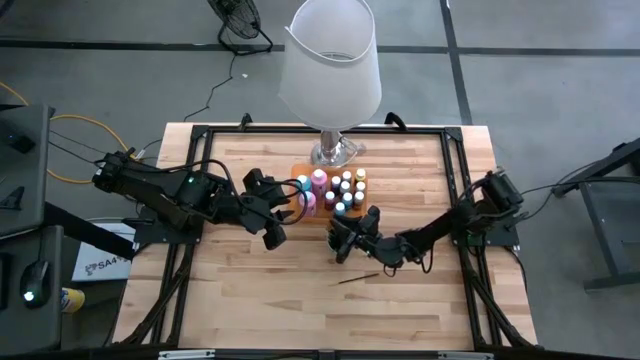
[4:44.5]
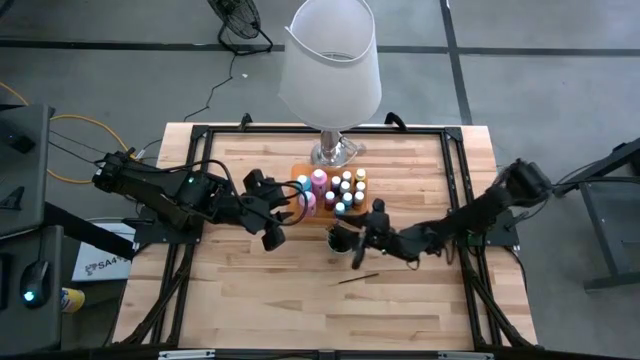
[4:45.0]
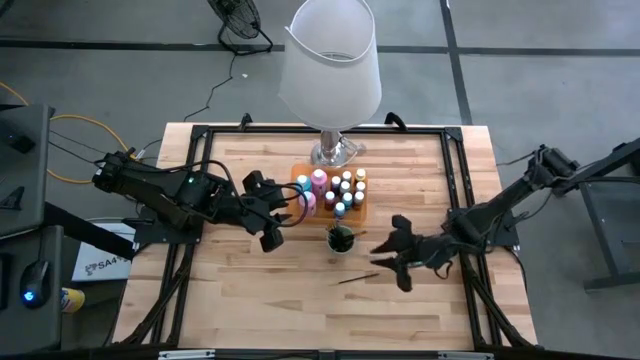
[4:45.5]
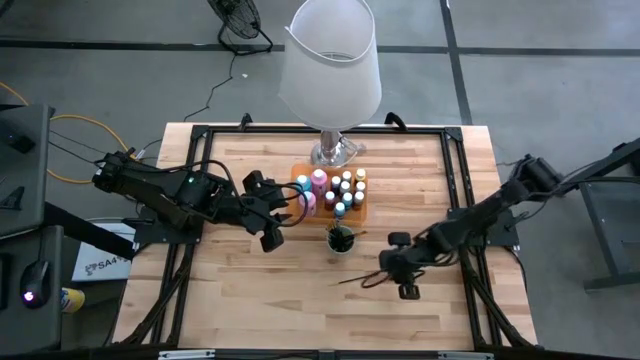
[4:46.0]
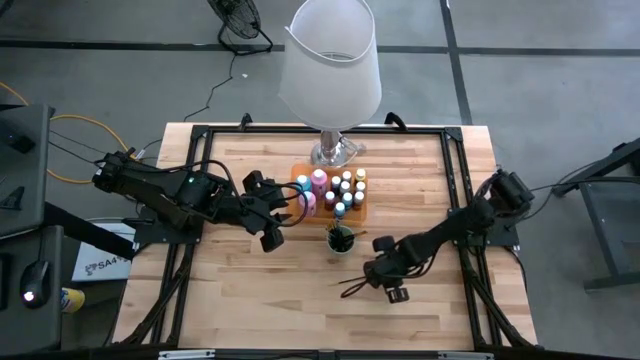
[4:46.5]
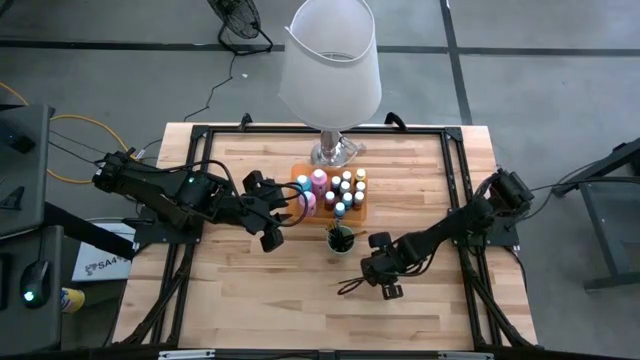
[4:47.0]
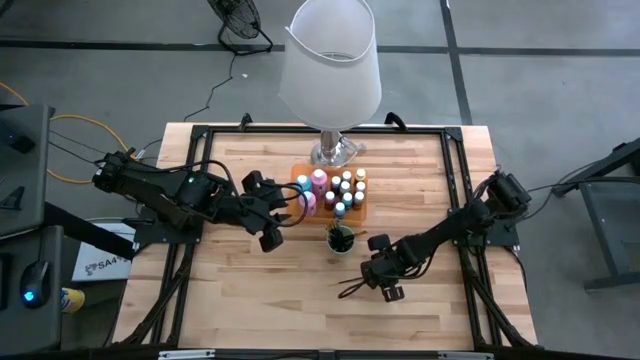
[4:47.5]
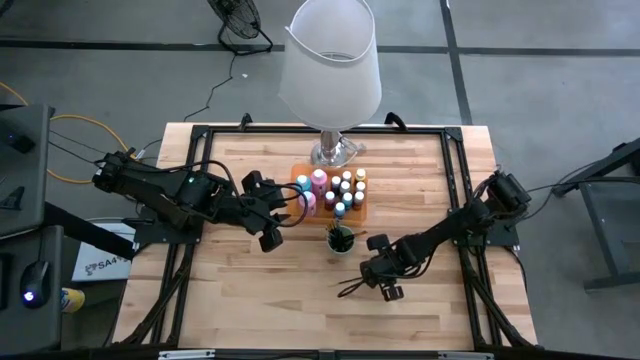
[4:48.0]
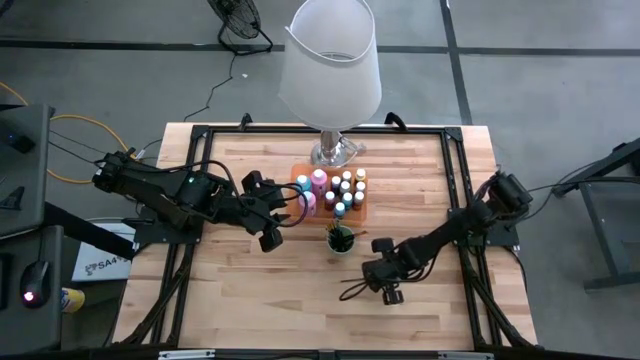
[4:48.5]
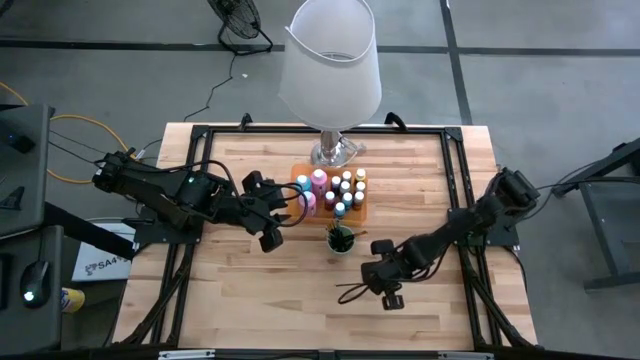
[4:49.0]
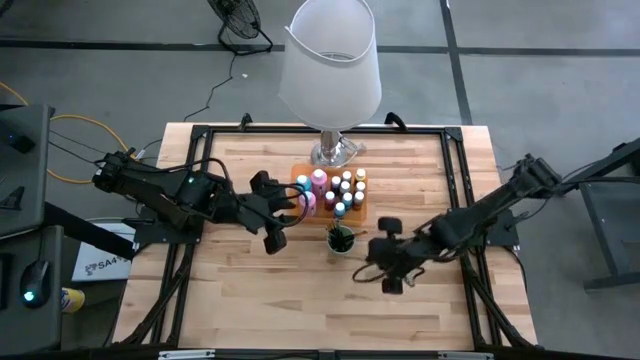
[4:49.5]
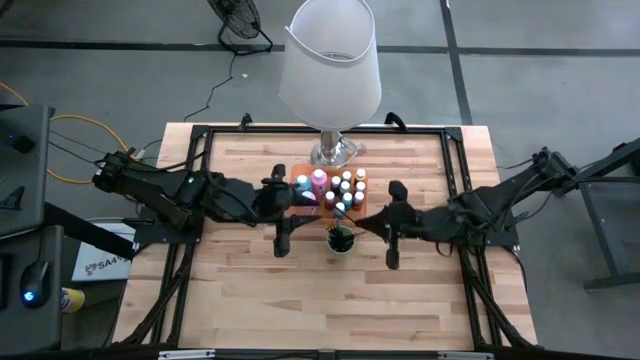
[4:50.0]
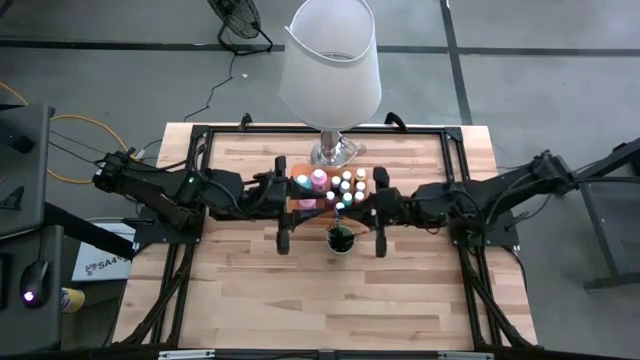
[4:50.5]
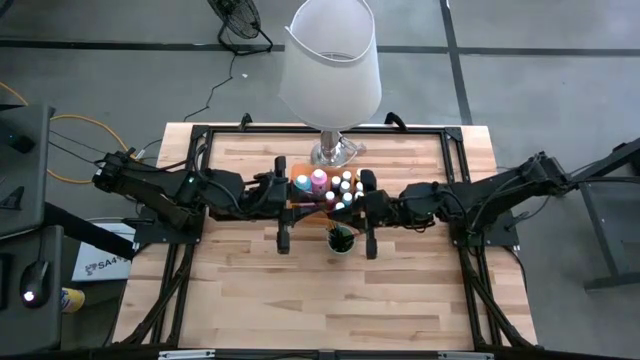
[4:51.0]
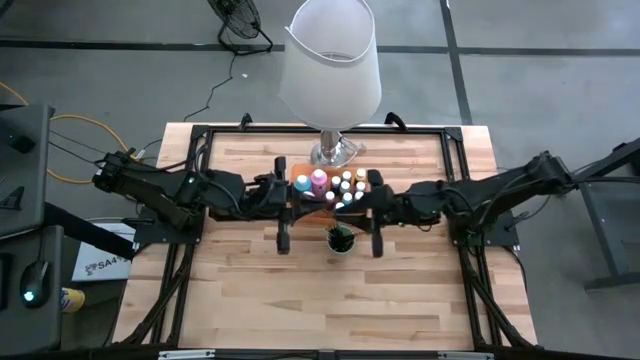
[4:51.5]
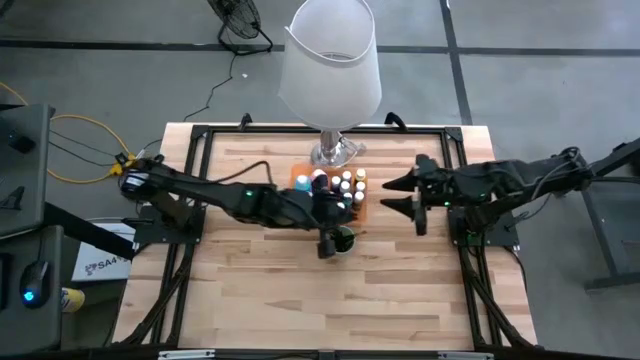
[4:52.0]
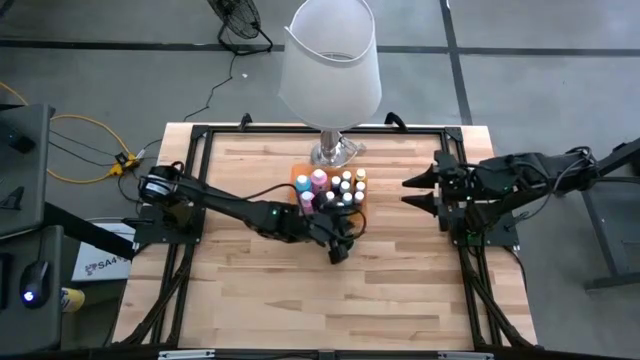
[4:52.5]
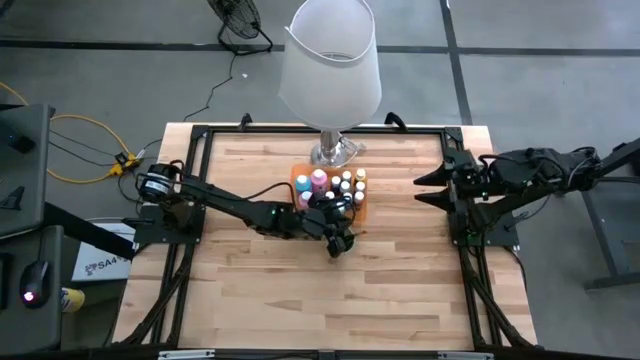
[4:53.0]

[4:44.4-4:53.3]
Task: Pick & Place Paint Supplies
Put the orange paintbrushes into the green cup

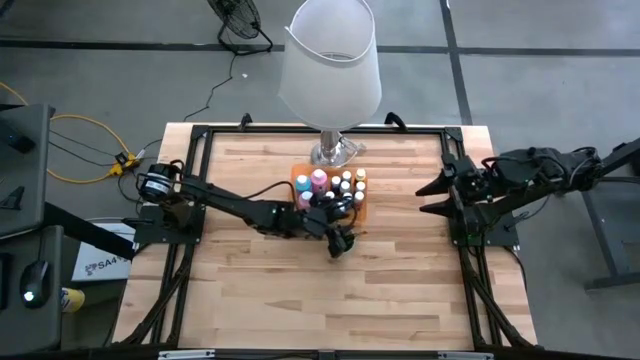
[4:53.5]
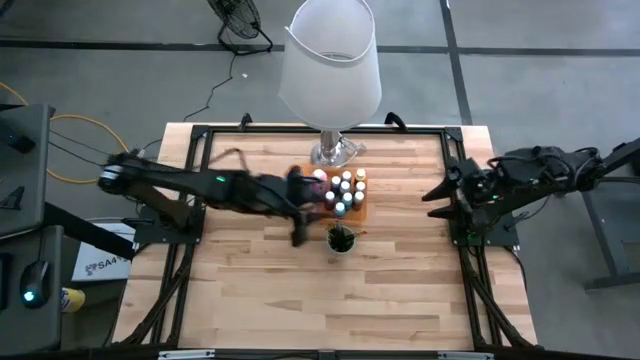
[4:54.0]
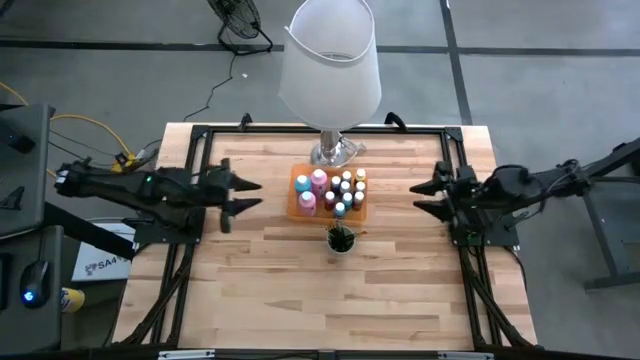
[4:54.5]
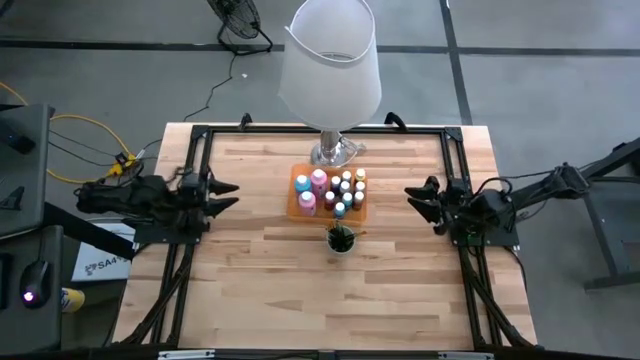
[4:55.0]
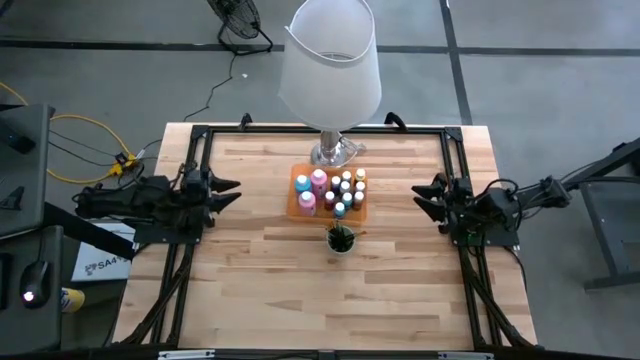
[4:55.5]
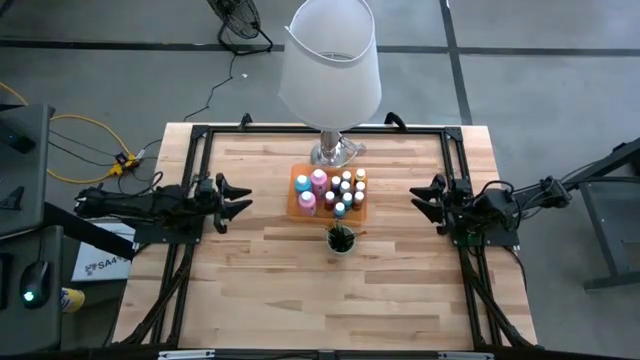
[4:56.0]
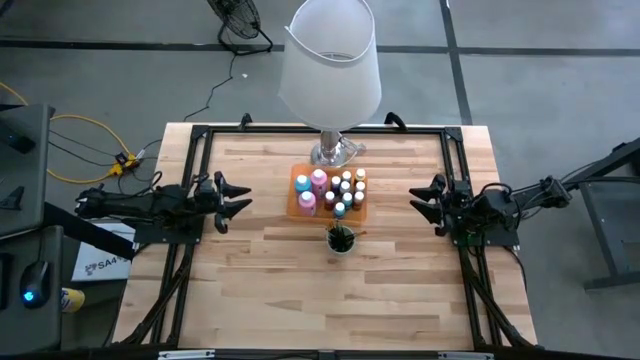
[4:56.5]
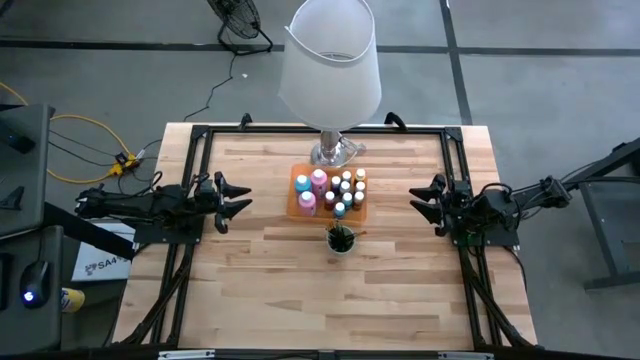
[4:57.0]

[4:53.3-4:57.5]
Return to Home Position

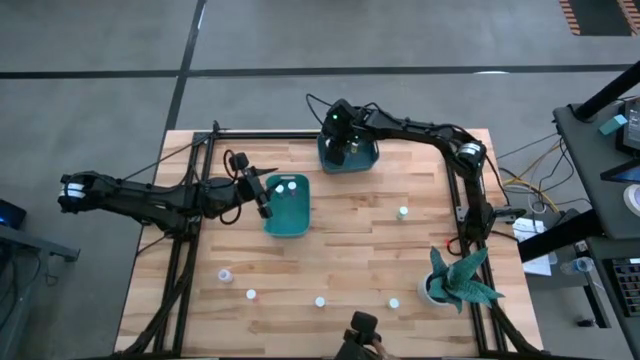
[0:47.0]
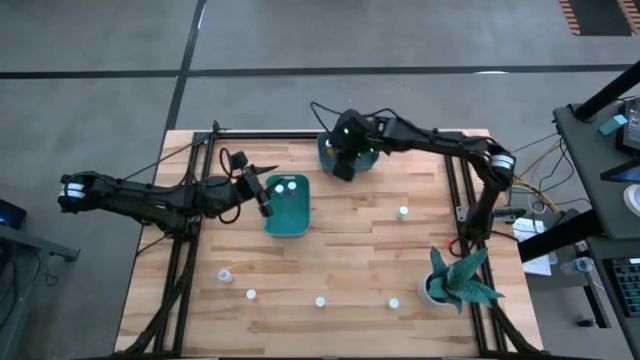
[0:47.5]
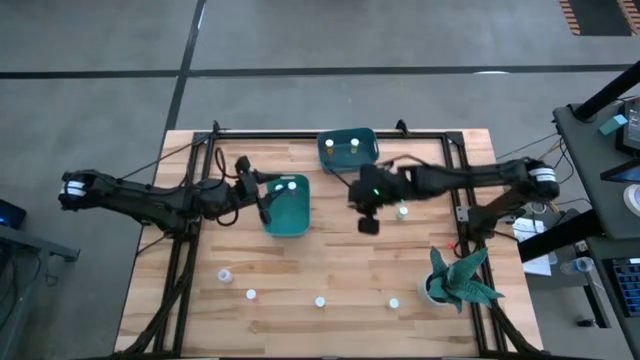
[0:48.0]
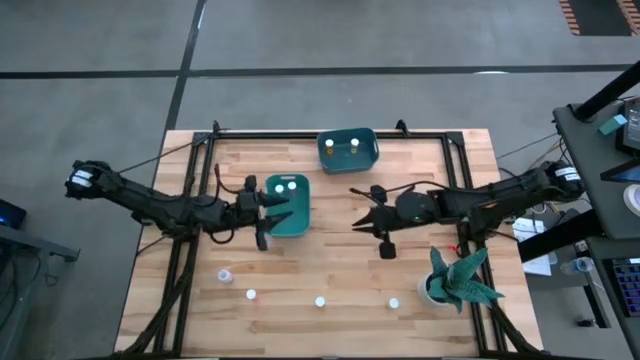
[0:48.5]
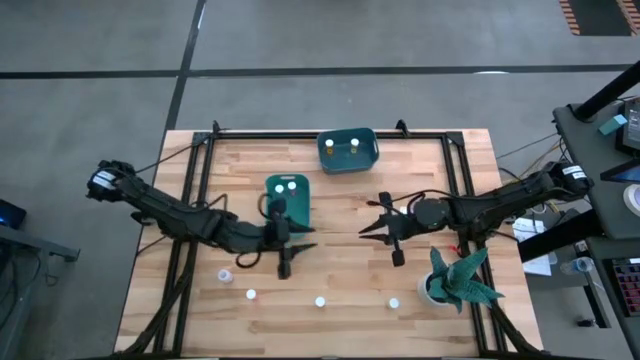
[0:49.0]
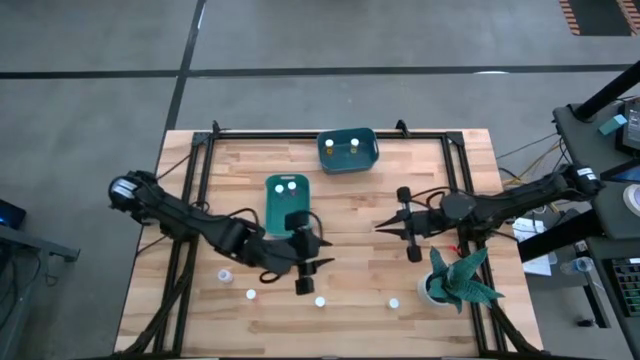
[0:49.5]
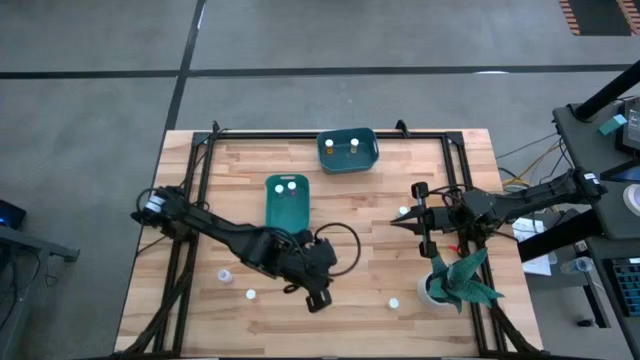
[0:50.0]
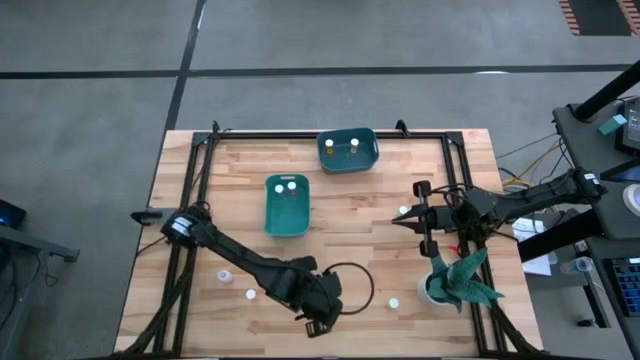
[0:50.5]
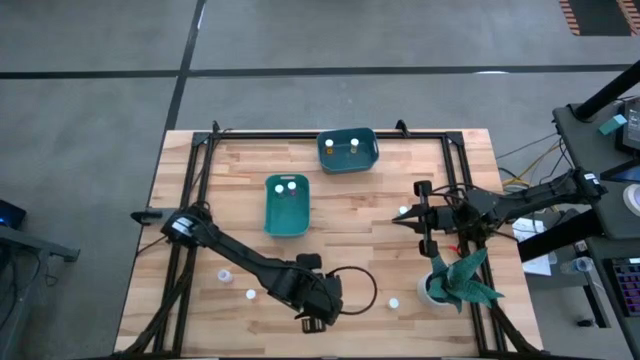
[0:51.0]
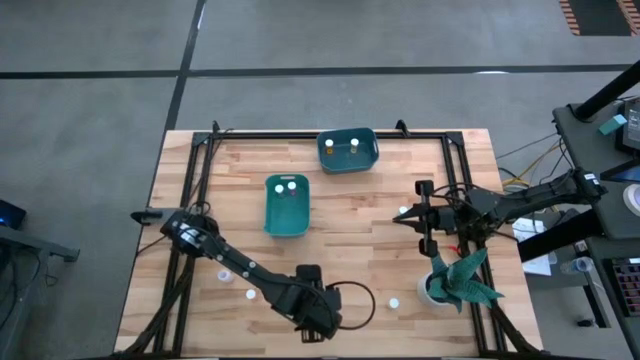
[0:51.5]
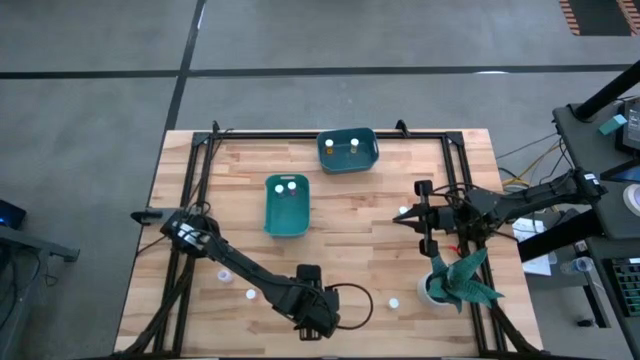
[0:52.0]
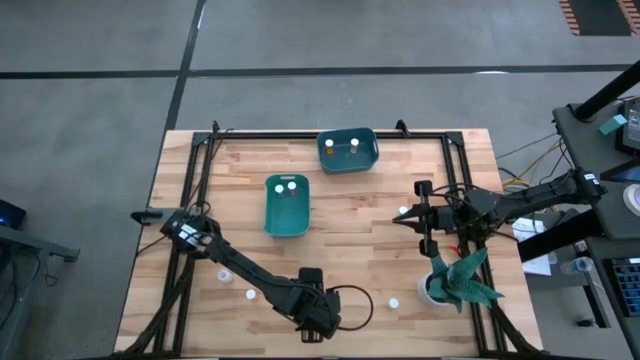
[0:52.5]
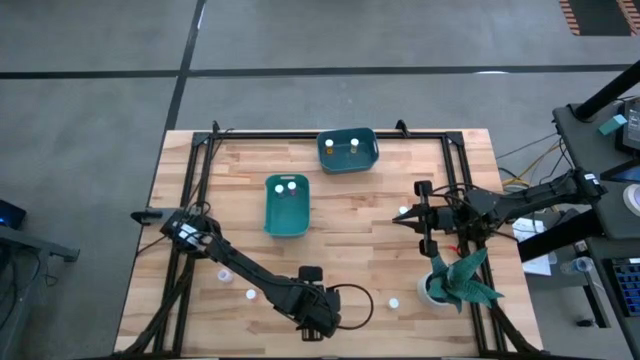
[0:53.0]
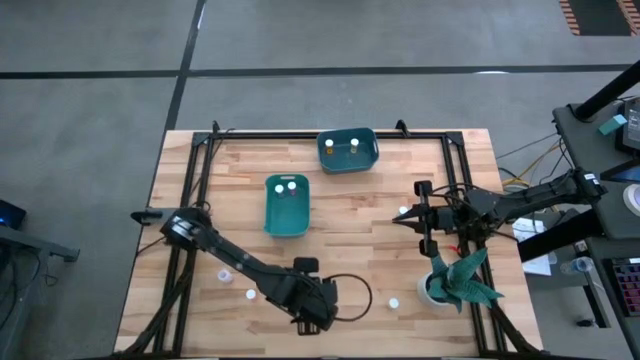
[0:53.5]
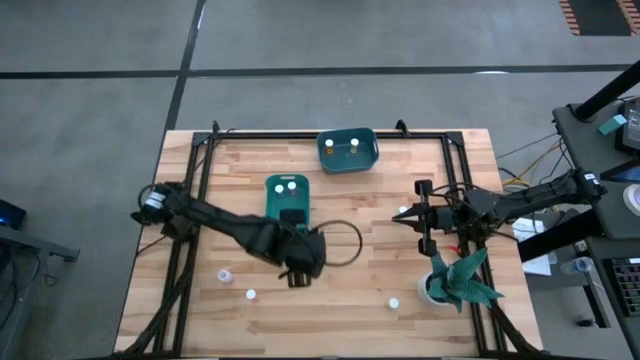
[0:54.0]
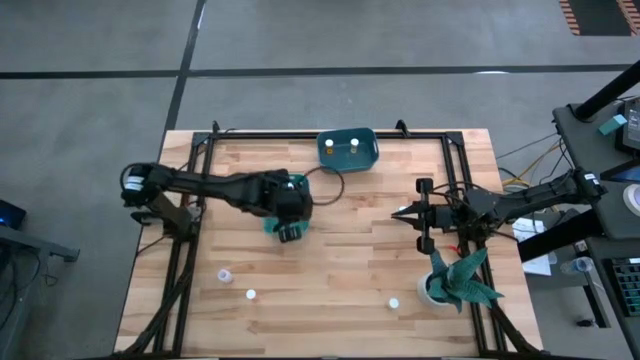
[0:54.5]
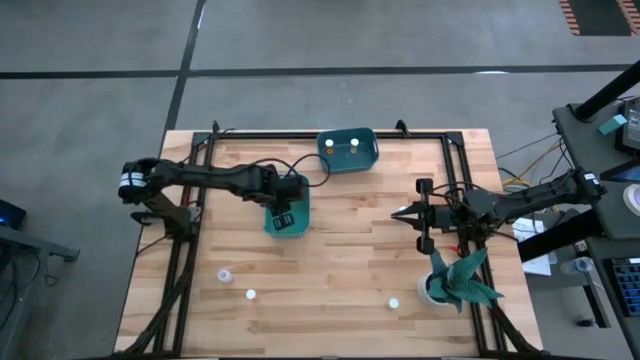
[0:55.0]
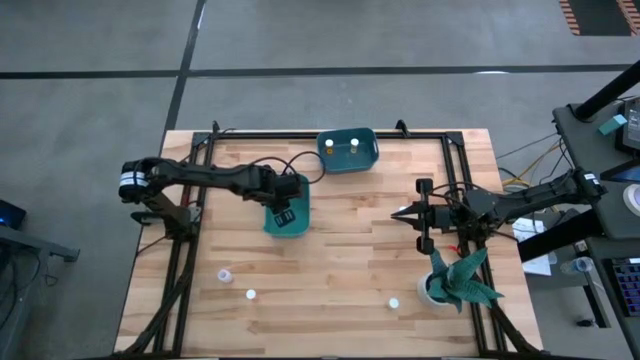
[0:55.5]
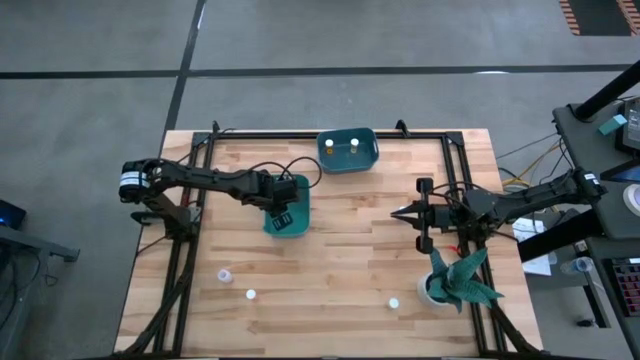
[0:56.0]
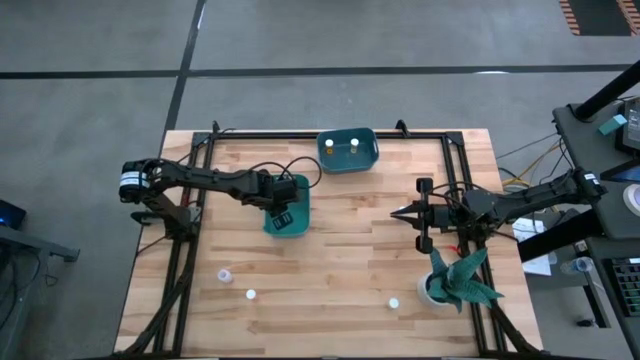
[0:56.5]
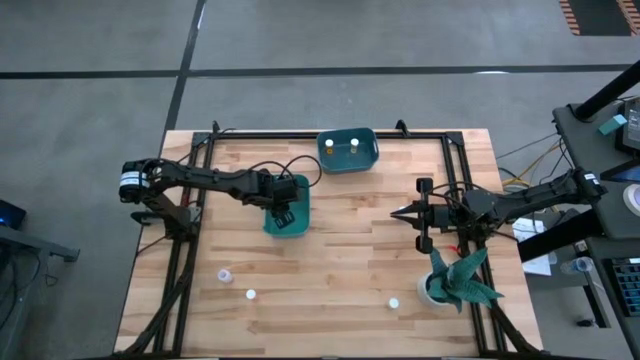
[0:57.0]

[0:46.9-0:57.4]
Task: Pick and place medicine bottles into bin by pill shape (circle, oval)
Put the yellow capsule pill bottle into the green bin
